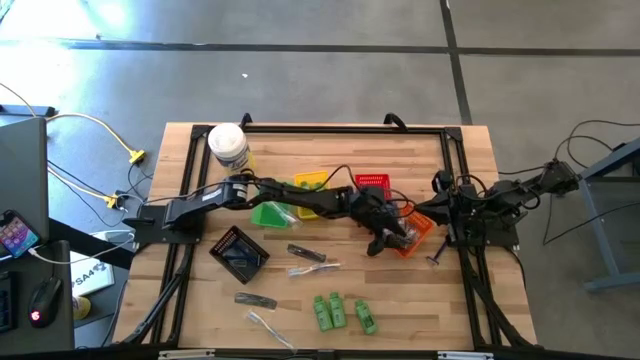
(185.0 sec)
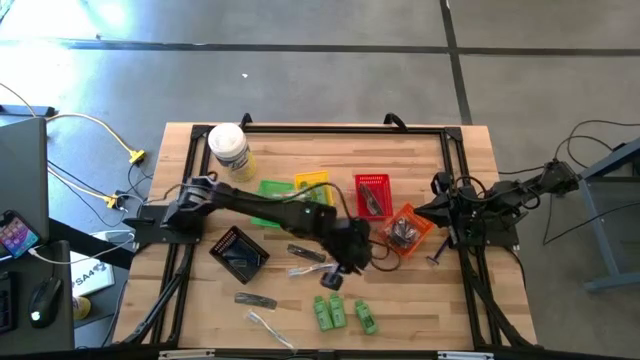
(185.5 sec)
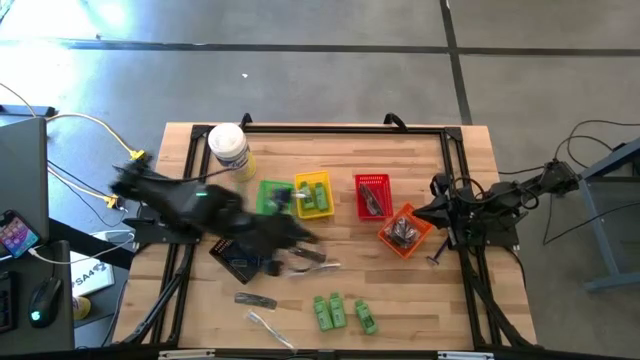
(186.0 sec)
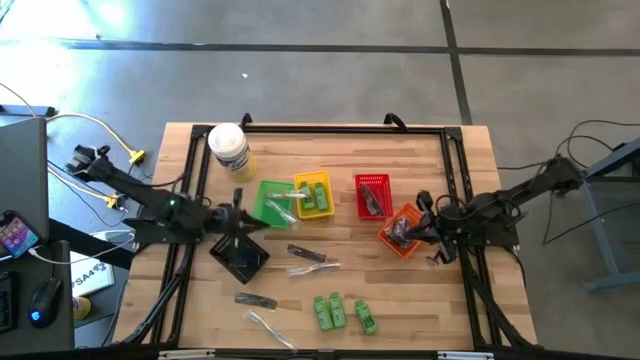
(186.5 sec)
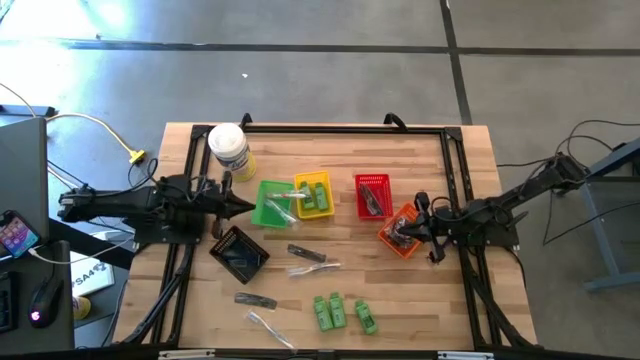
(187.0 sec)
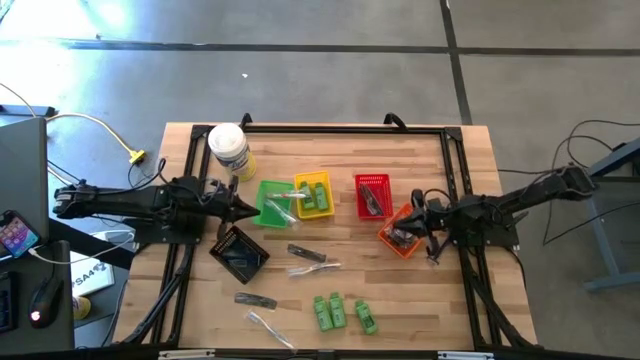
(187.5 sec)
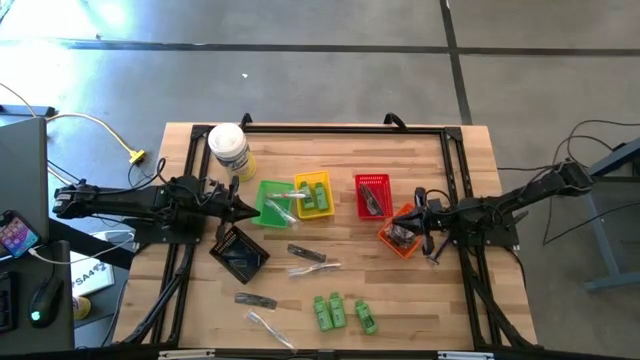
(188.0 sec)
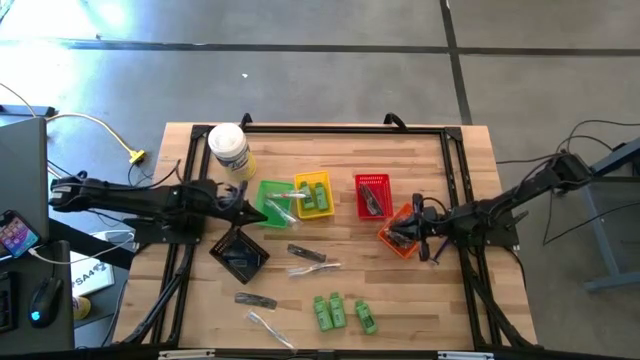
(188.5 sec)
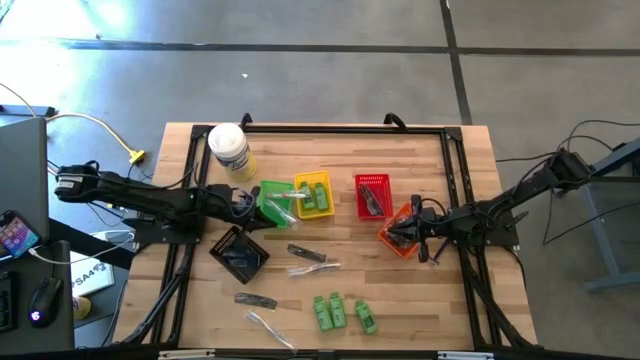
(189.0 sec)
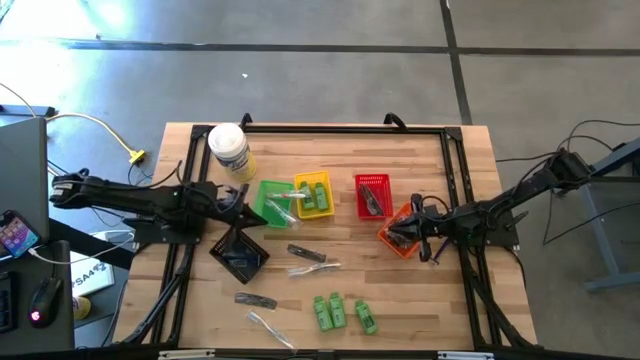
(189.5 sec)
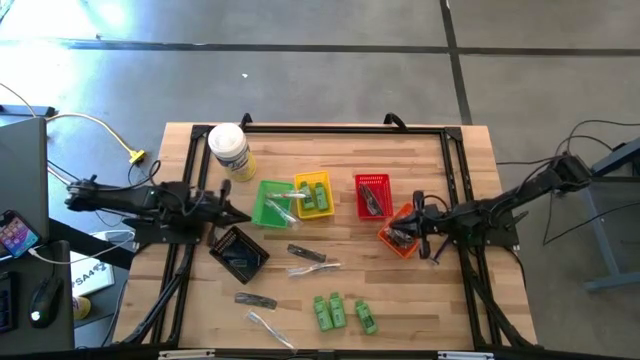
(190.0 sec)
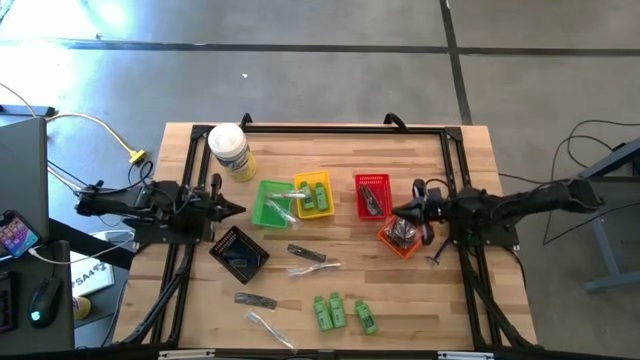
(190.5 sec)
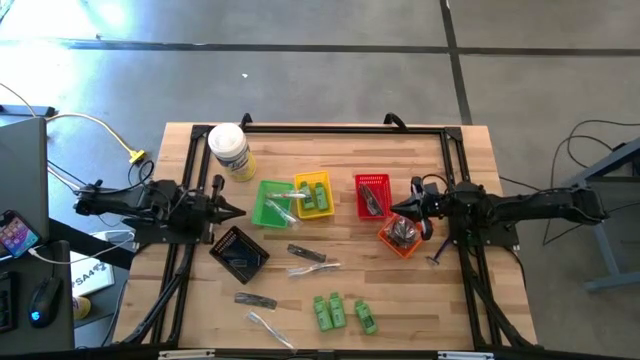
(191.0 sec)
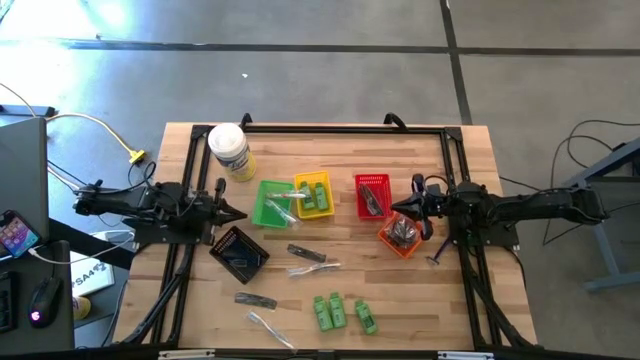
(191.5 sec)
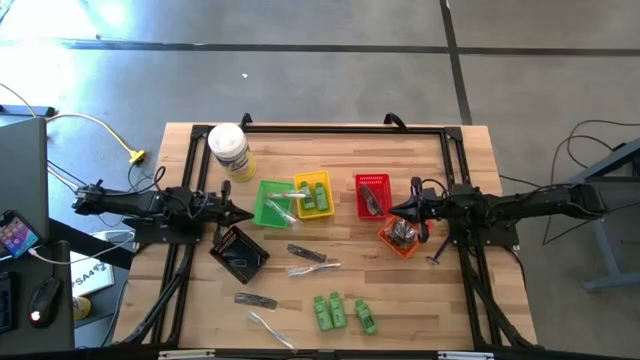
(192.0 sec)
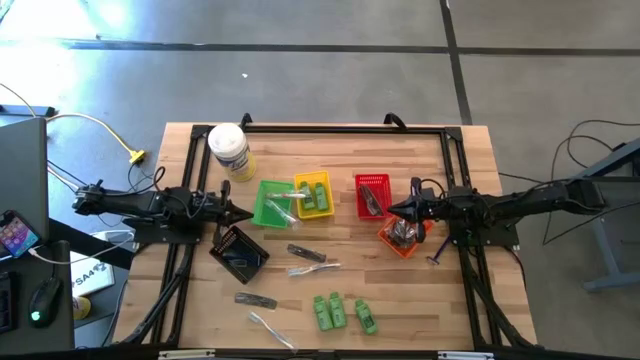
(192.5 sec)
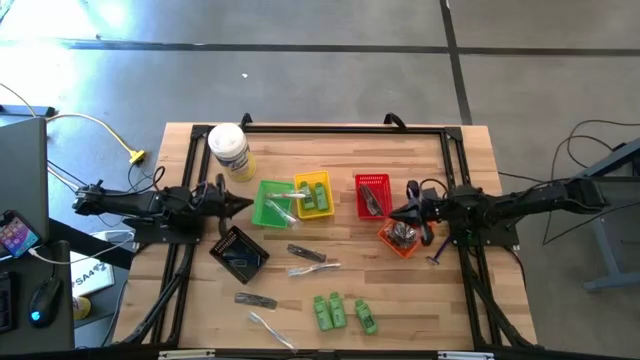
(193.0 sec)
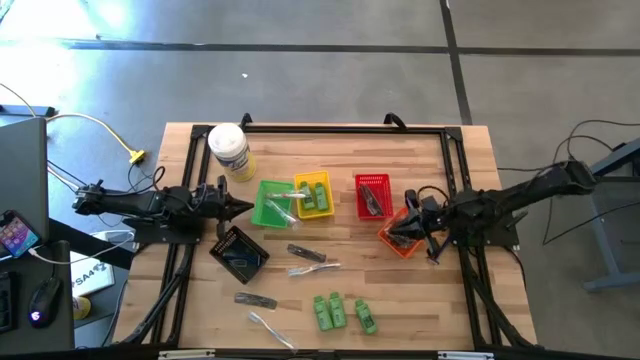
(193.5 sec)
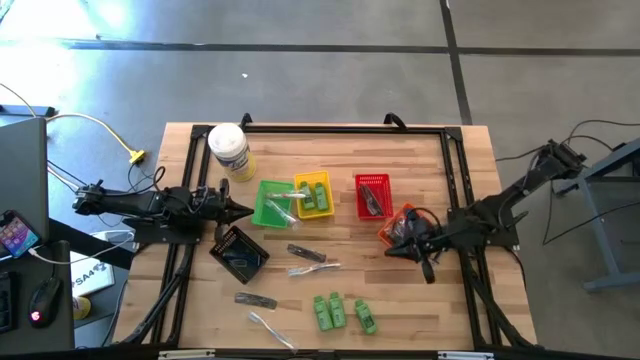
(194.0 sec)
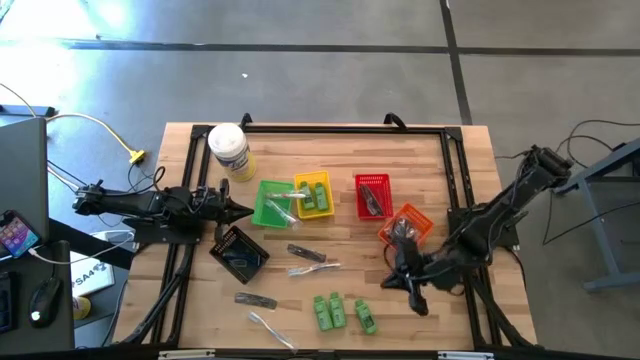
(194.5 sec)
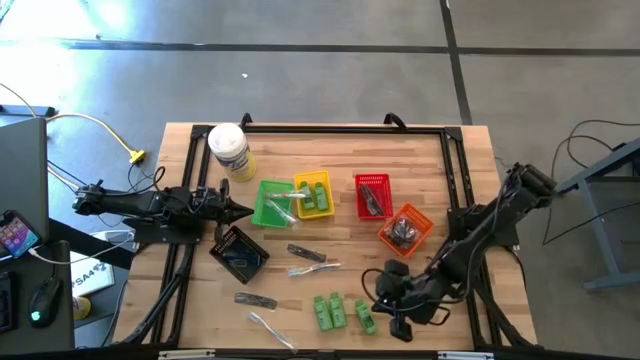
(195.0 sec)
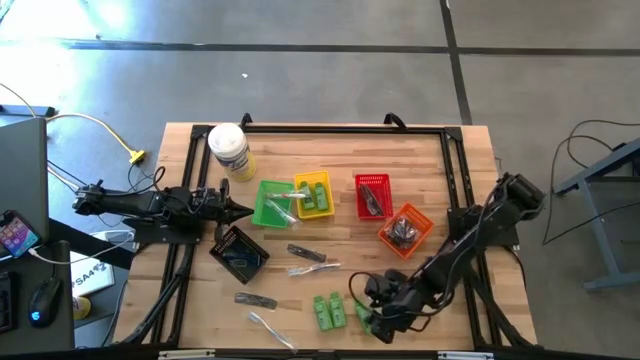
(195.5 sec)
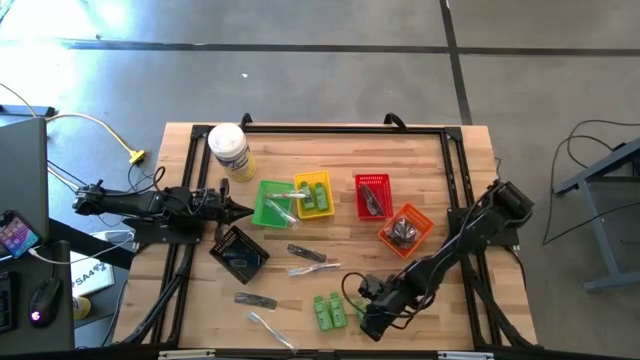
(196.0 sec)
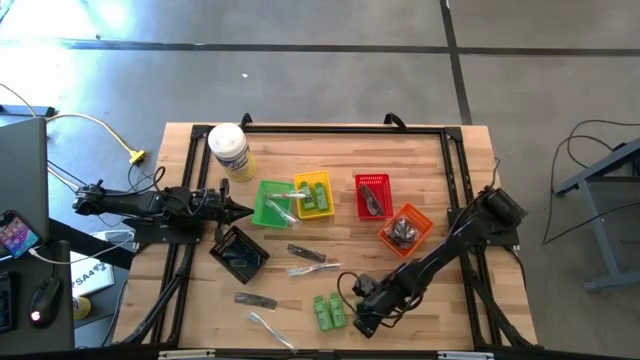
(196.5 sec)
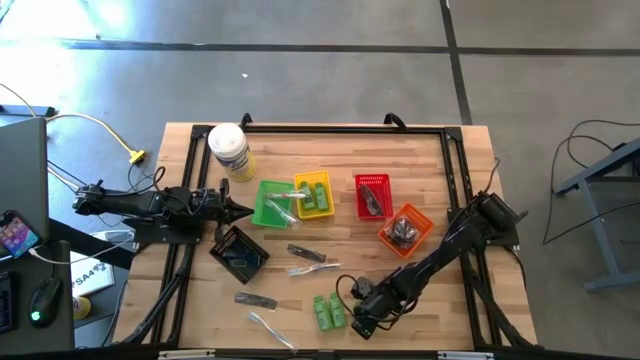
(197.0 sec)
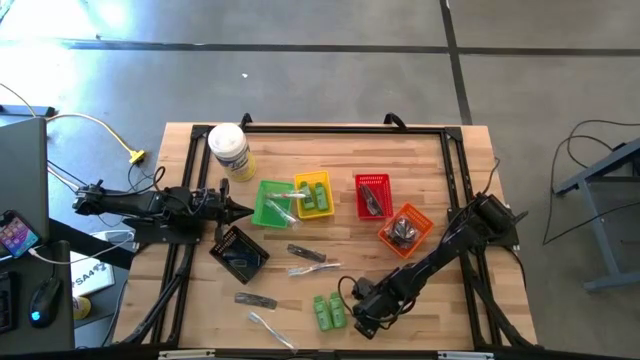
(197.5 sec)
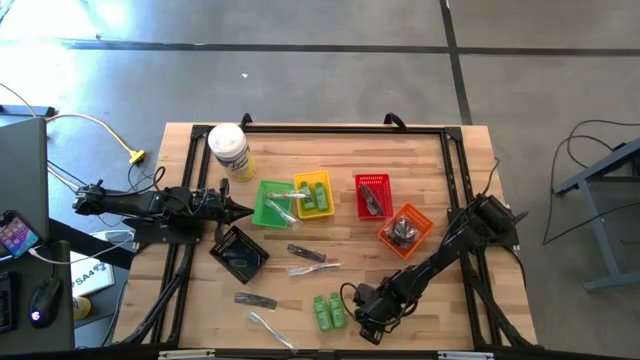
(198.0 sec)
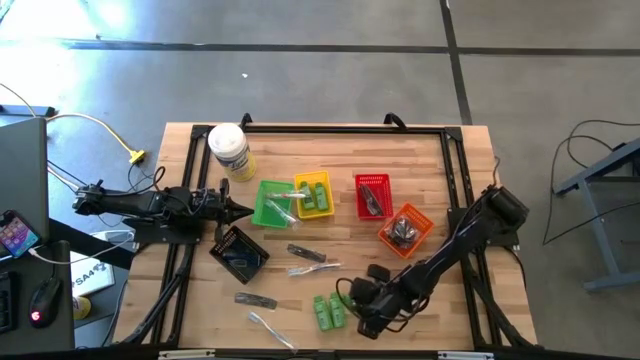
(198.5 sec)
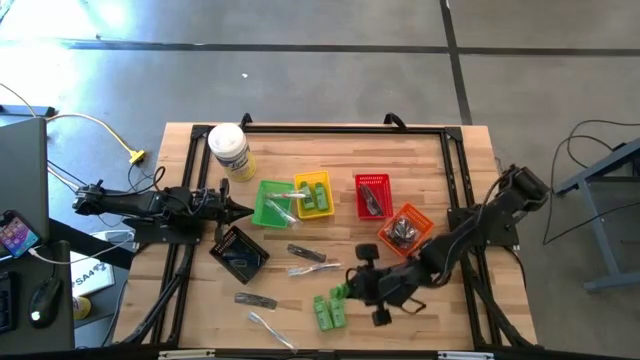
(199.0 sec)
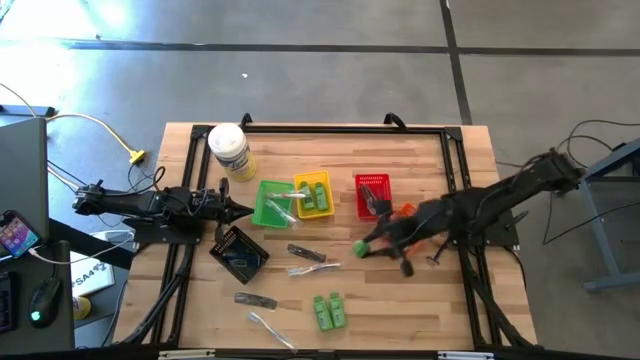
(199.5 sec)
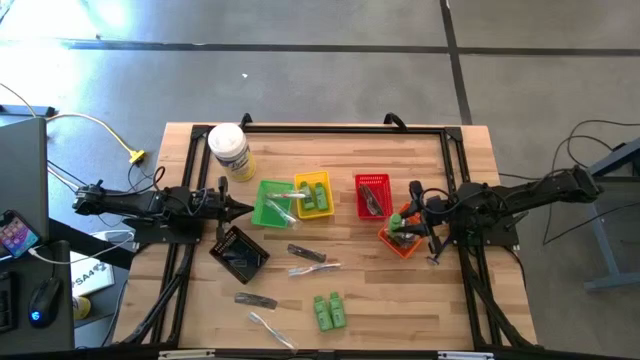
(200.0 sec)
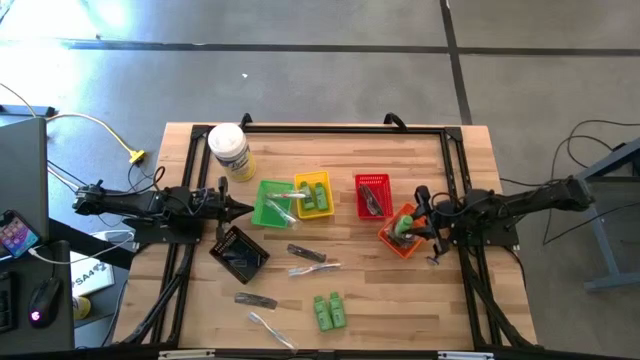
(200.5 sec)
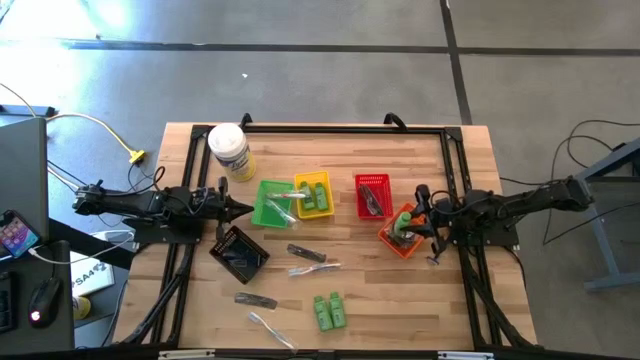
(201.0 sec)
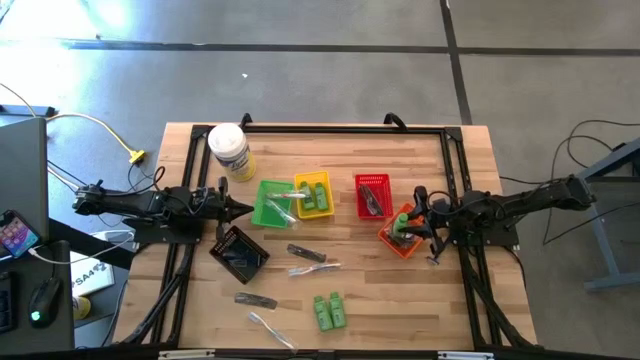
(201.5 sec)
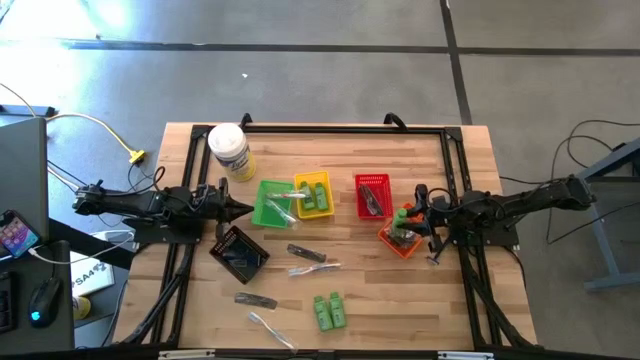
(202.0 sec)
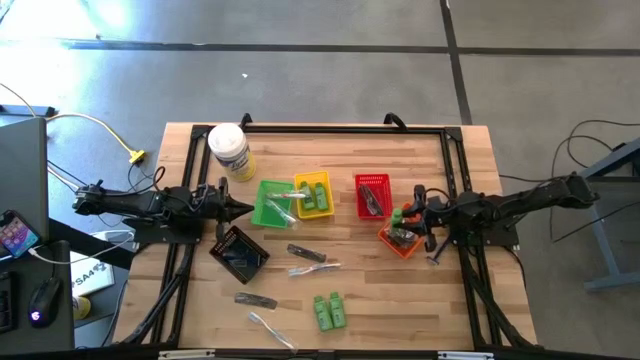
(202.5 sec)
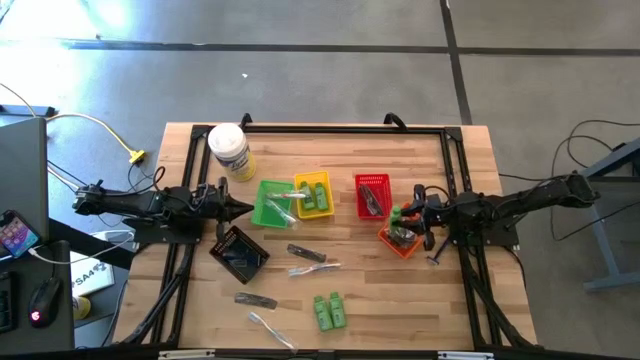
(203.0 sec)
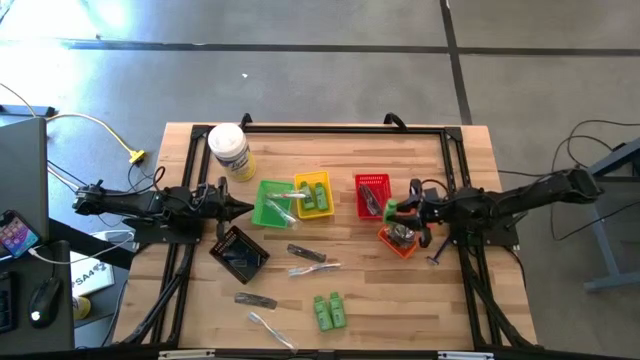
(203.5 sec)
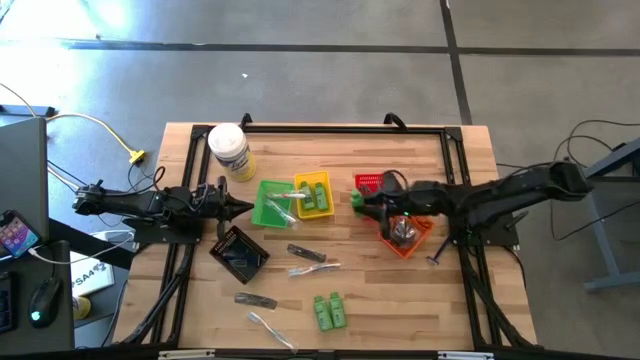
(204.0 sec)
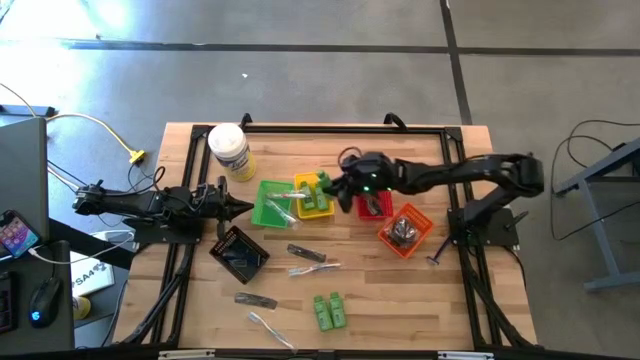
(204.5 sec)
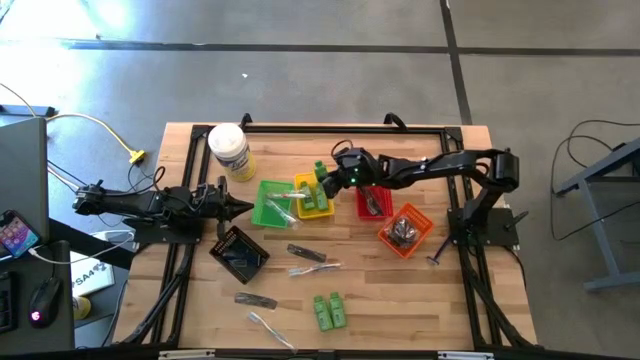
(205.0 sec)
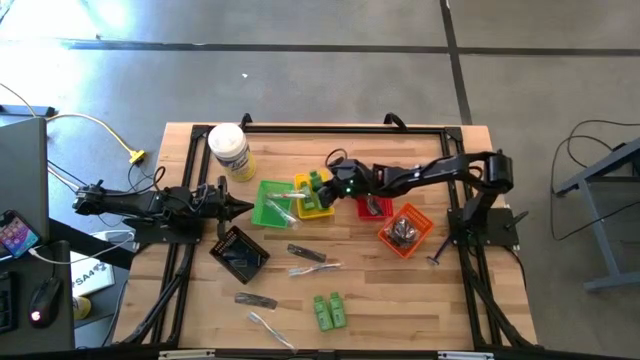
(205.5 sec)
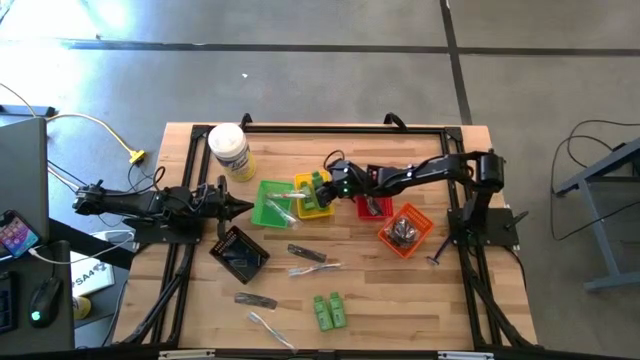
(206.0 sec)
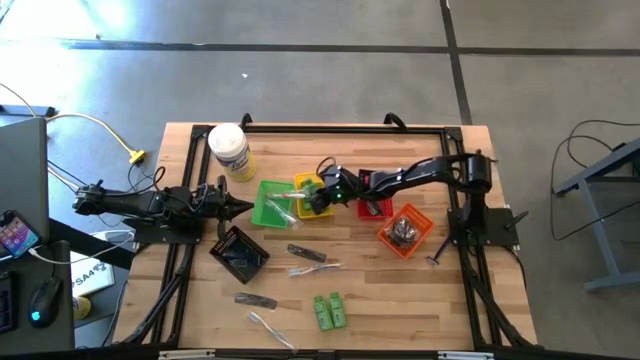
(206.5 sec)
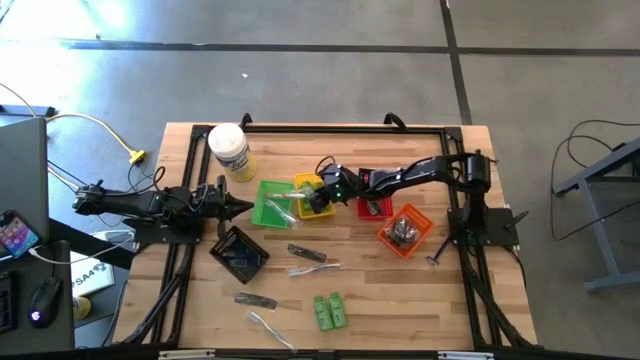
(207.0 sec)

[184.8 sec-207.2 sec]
Task: Pick & Place Travel size toiletries
Put the right green shampoo into yellow basket
